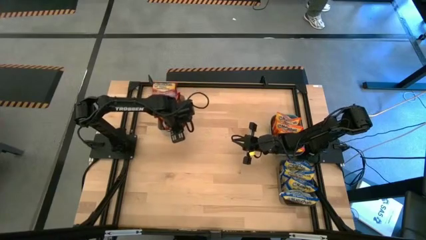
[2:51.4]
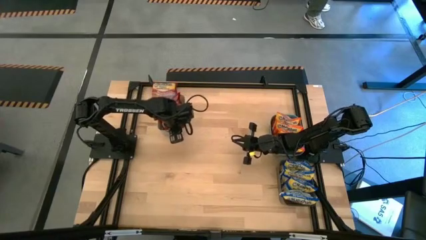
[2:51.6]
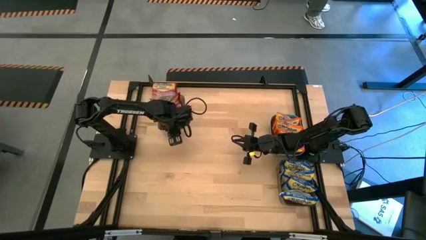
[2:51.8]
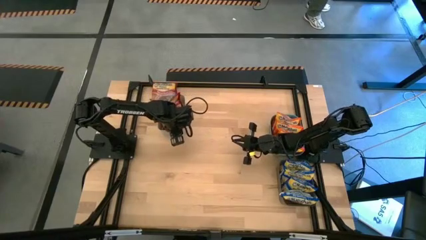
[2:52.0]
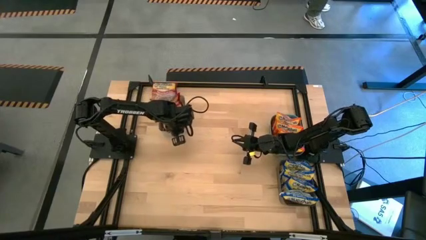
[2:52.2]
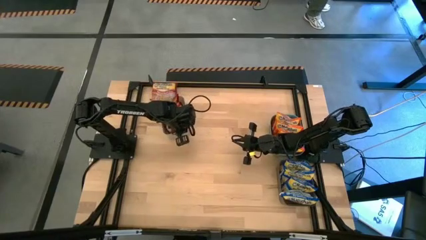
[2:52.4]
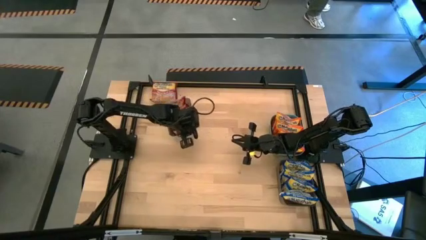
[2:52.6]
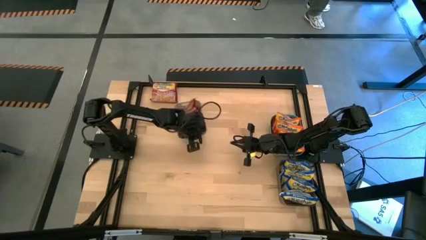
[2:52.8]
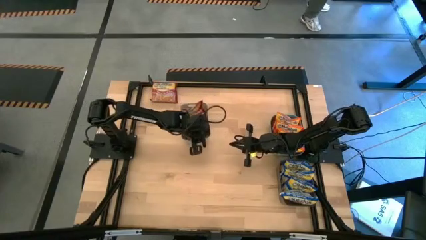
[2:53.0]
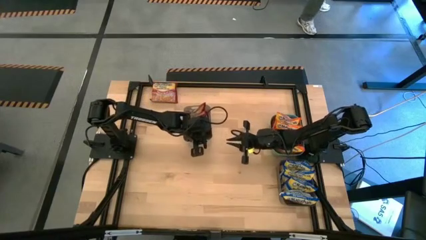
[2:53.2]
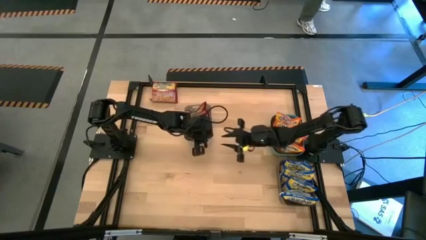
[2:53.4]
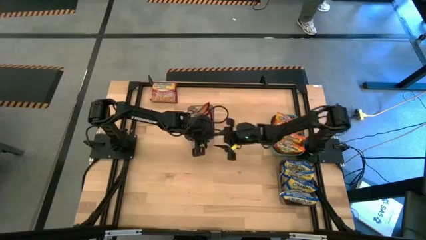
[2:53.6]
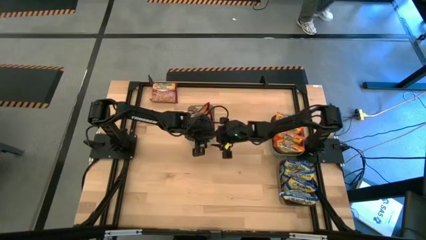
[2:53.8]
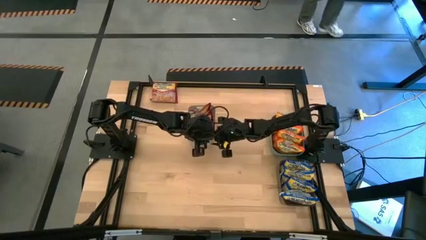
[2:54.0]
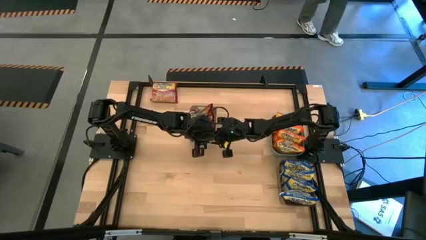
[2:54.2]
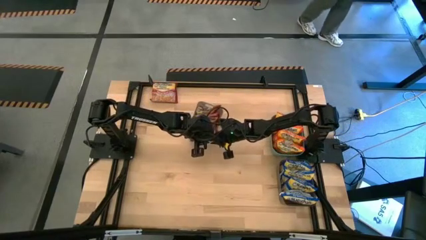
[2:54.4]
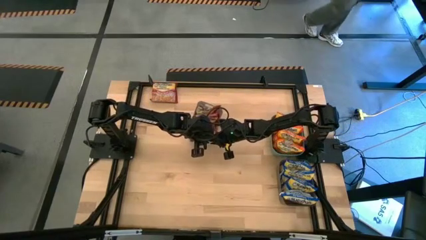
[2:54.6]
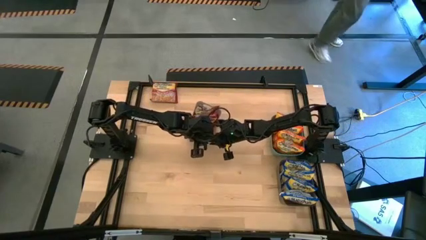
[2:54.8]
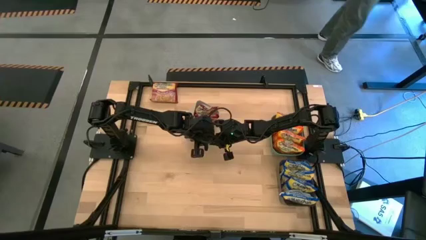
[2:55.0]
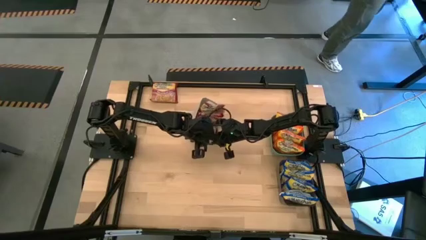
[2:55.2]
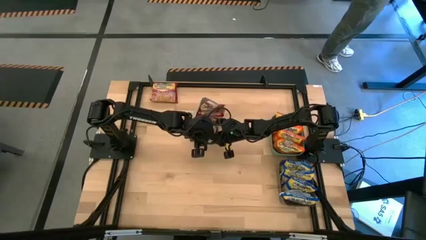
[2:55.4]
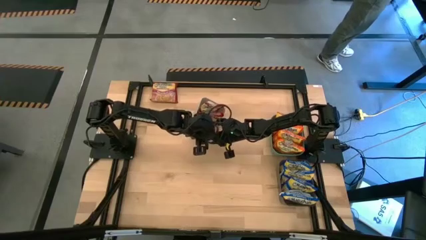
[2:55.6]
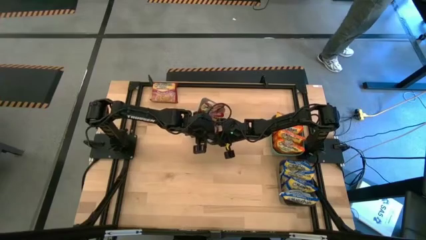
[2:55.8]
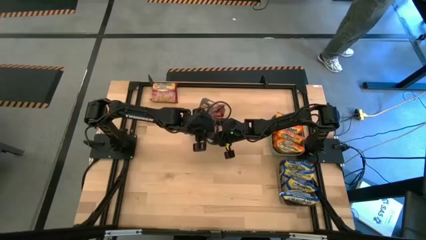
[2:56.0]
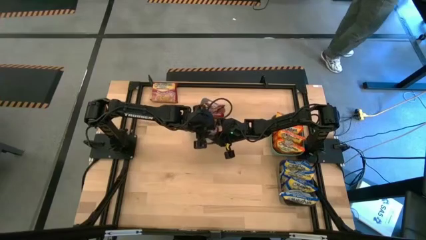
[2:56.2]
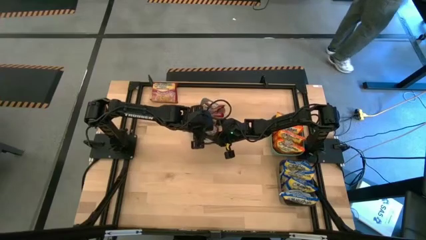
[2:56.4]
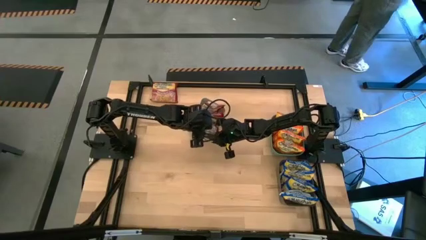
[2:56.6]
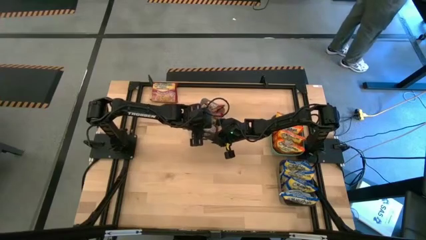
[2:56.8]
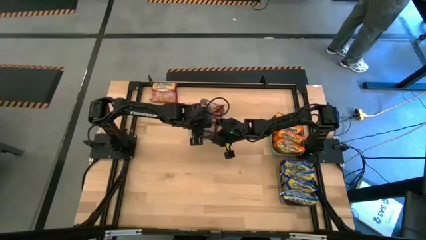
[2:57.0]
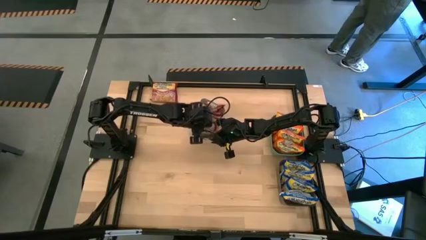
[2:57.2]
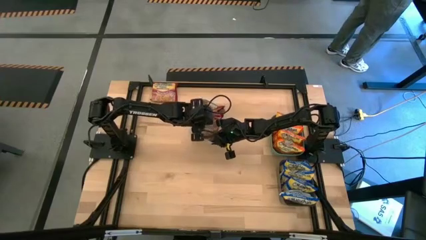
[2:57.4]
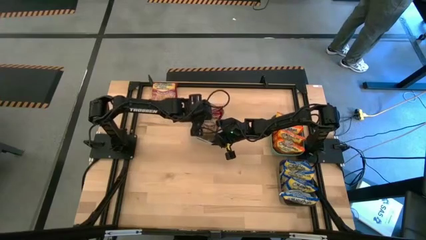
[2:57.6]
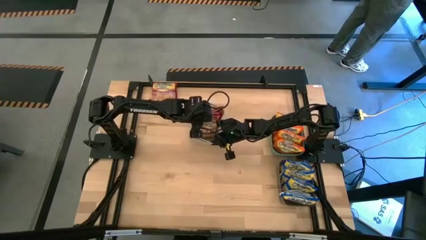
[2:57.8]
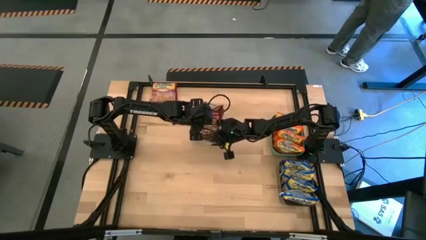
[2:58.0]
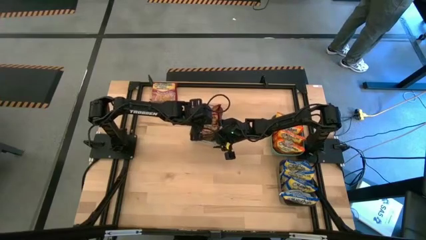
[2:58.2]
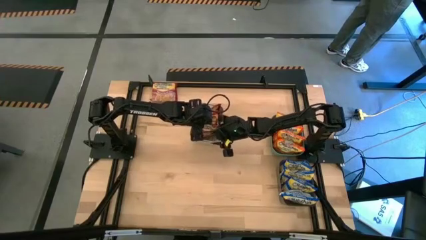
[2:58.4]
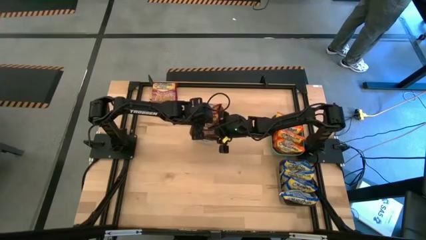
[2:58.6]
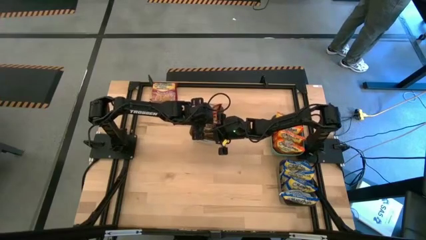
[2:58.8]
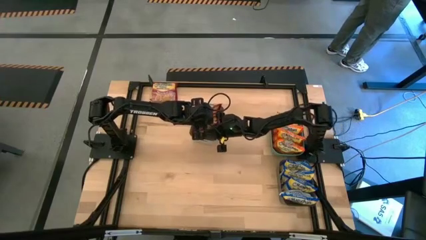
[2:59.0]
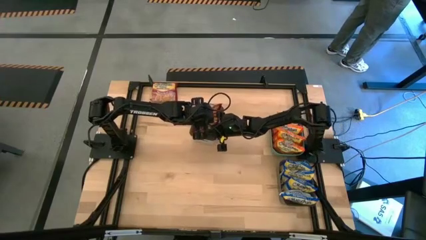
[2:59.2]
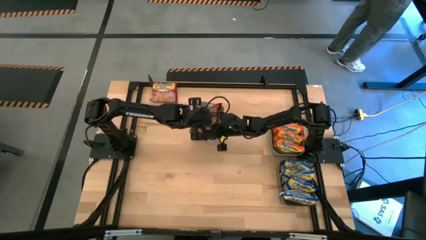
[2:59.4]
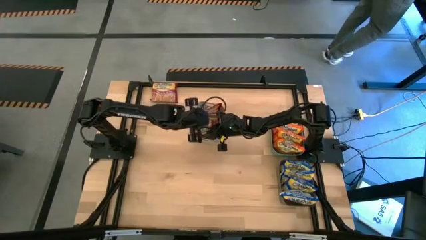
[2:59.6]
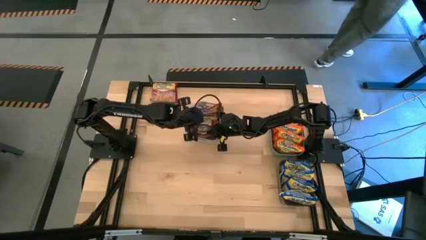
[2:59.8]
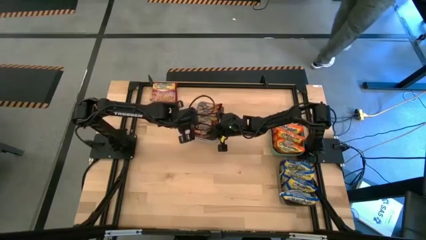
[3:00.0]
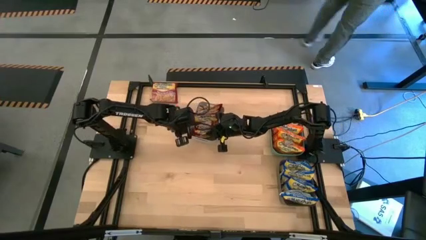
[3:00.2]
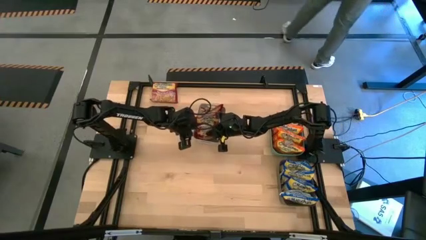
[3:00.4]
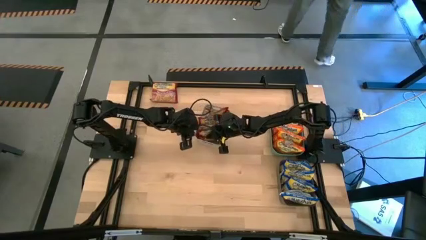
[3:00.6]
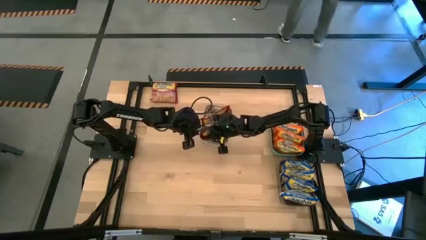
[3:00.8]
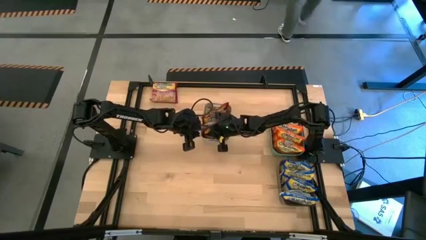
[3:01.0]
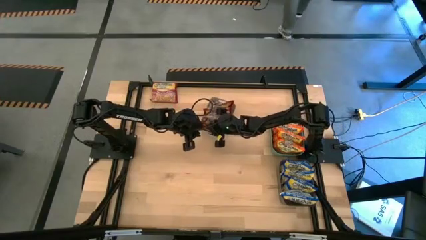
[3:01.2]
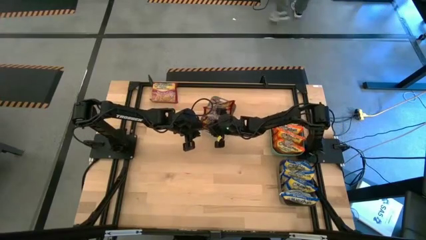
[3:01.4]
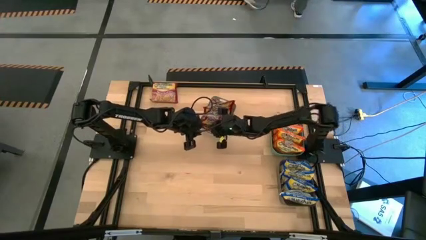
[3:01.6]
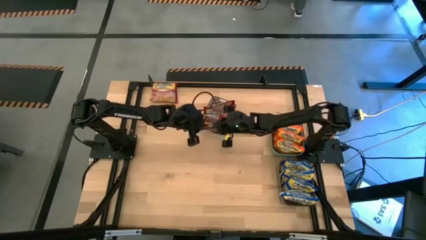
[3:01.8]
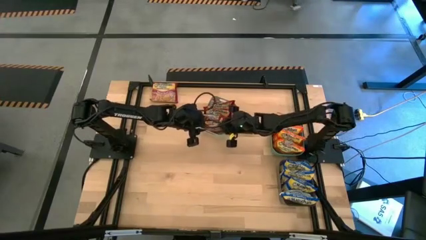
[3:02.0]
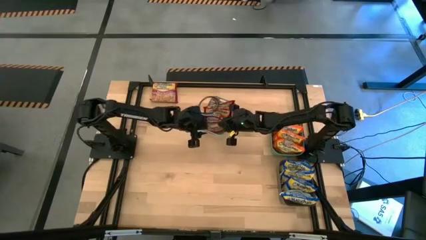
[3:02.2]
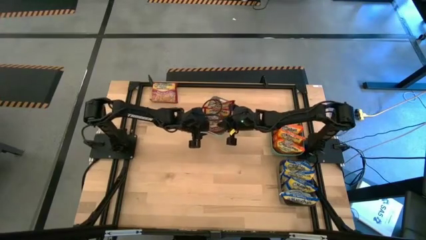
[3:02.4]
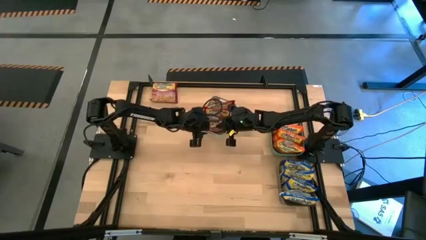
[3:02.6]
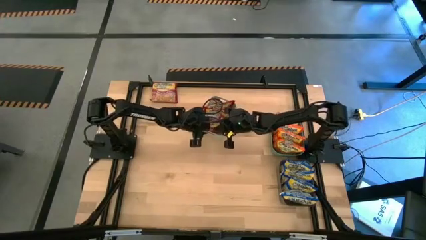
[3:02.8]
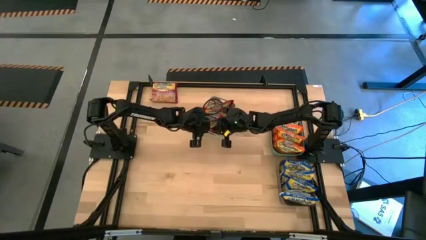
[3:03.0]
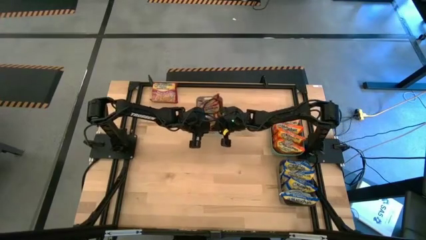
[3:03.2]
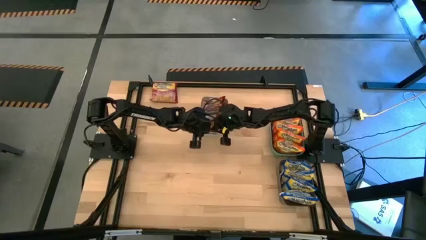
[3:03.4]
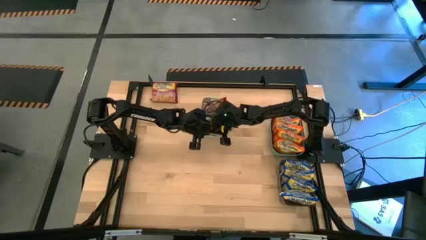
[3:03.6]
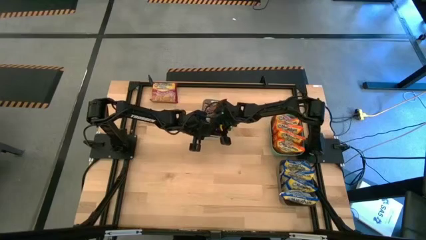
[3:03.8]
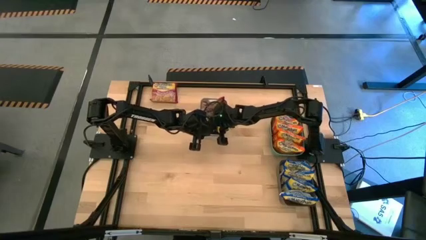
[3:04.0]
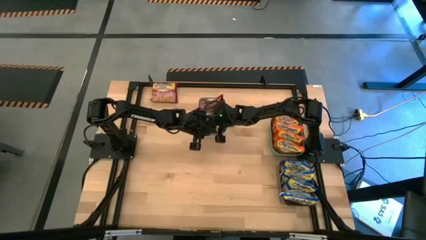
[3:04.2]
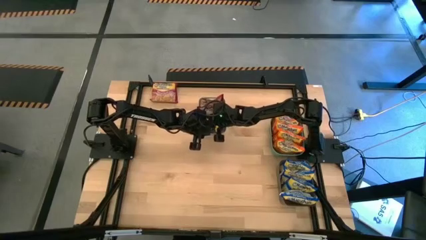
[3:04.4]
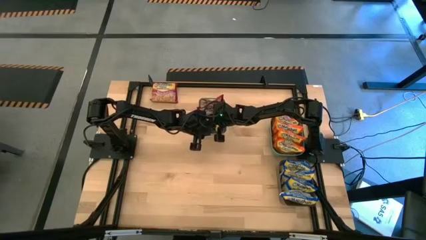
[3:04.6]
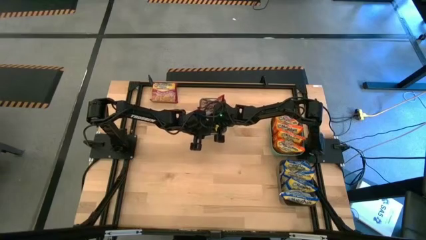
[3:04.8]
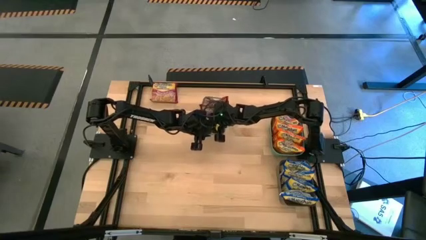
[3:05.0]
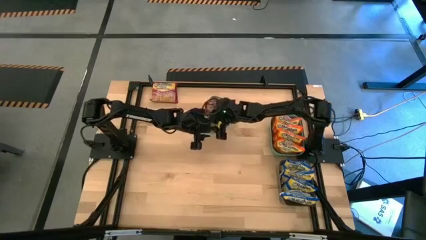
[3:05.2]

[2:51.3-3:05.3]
Task: Sort Maruchan noodles
Adjust the white bin

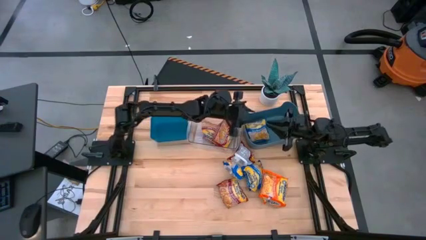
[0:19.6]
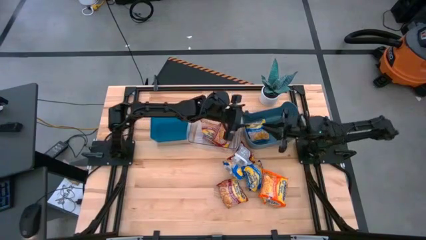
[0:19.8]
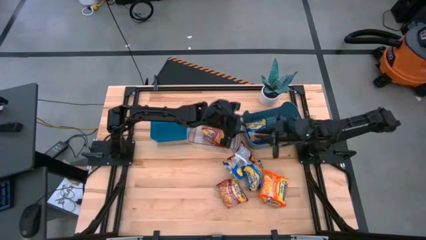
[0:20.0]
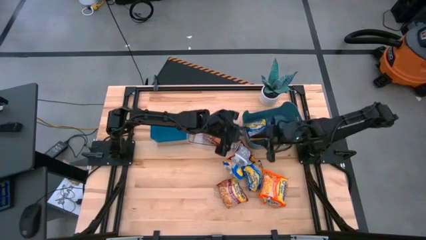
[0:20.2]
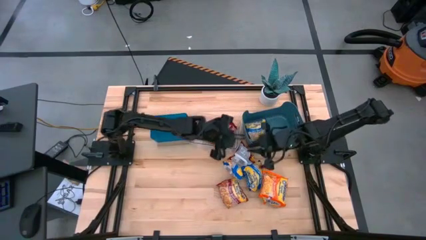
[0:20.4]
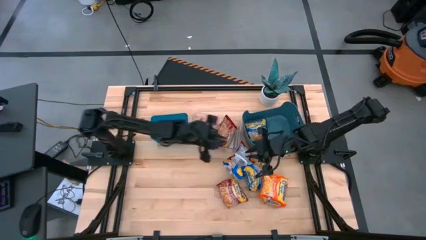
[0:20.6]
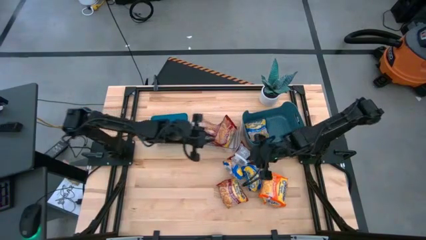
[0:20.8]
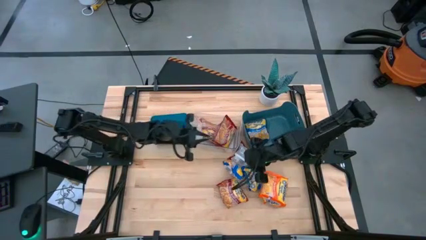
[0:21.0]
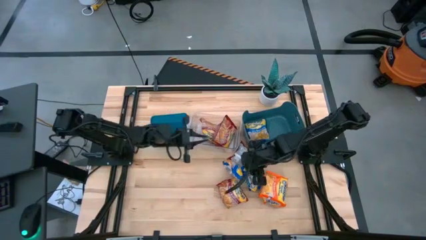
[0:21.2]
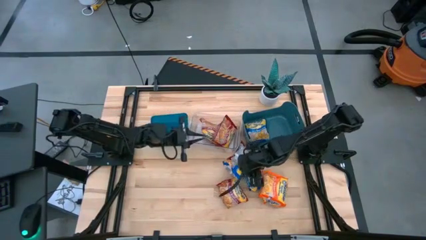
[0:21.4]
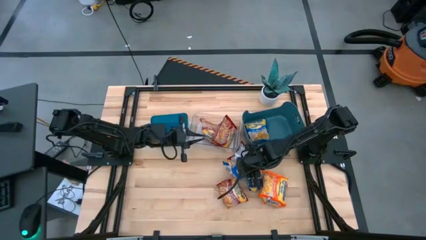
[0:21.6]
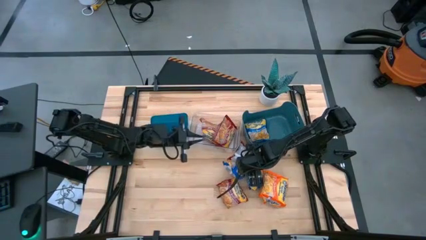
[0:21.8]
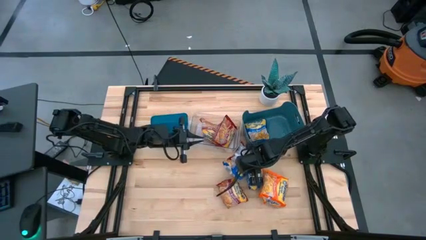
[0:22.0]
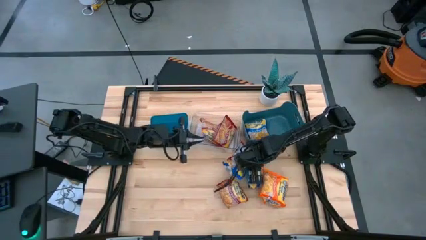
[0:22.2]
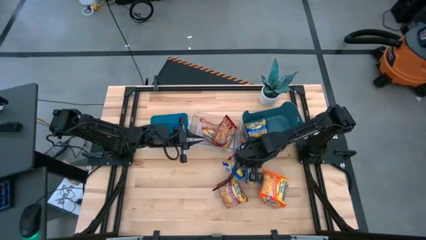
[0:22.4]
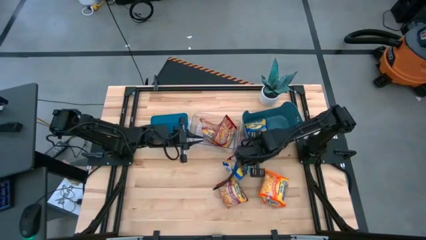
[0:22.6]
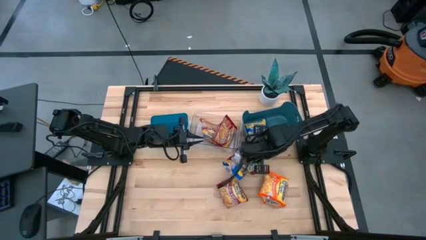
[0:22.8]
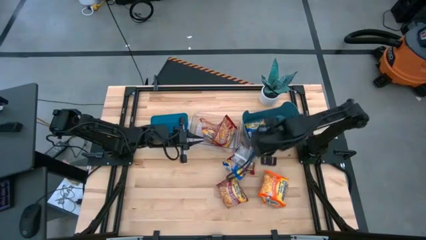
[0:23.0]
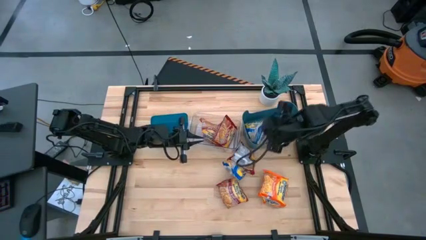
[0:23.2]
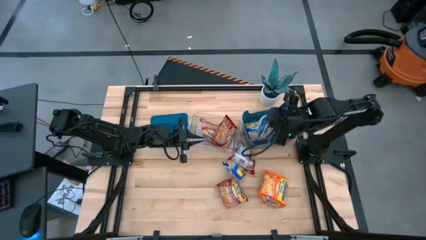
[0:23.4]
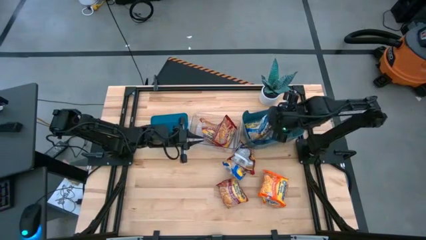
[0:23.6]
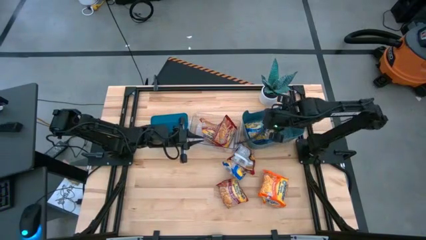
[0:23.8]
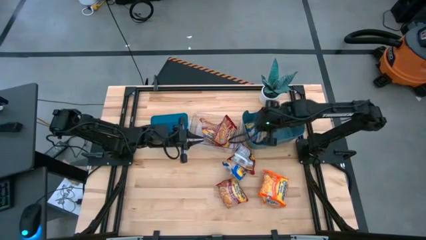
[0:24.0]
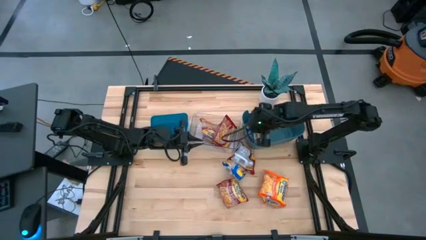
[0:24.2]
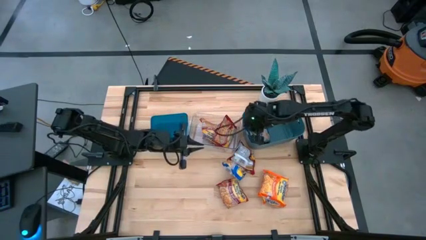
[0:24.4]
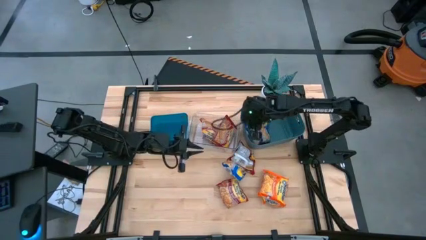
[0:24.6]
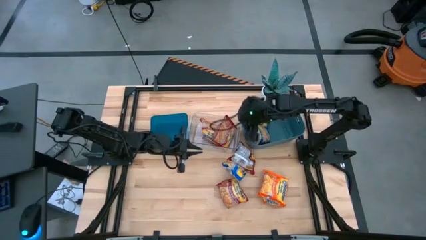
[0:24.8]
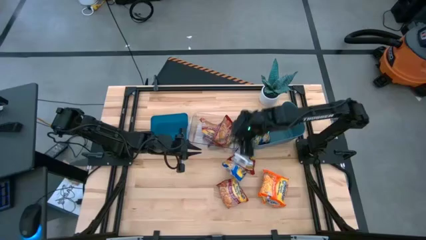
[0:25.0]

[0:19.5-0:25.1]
Task: Sort Maruchan noodles
Put the blue noodle pack into the right blue bin
